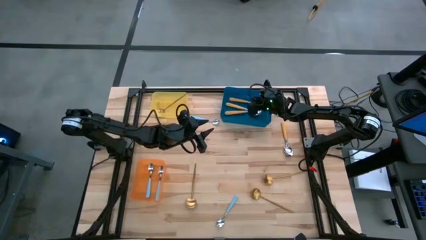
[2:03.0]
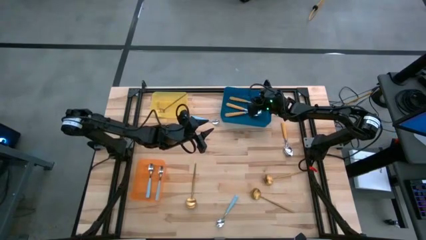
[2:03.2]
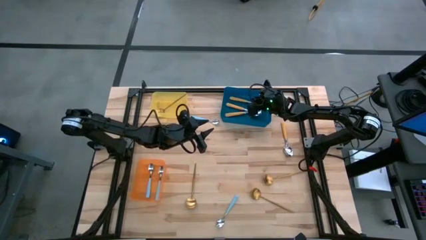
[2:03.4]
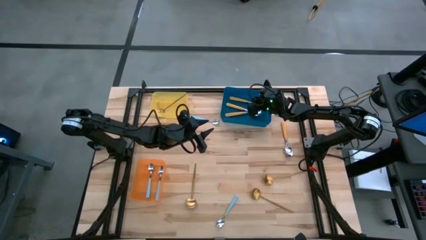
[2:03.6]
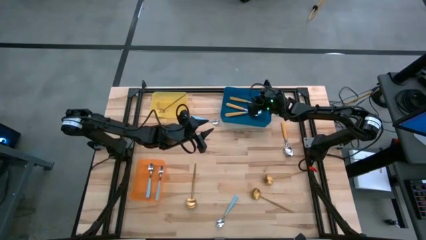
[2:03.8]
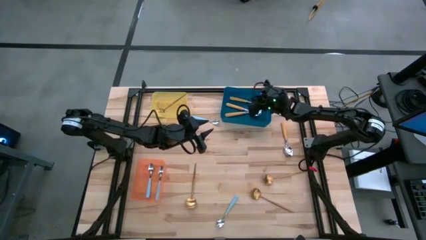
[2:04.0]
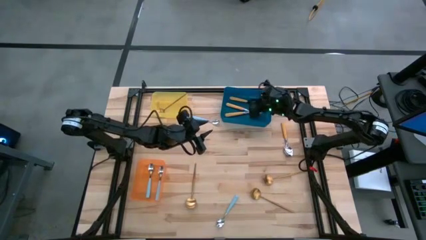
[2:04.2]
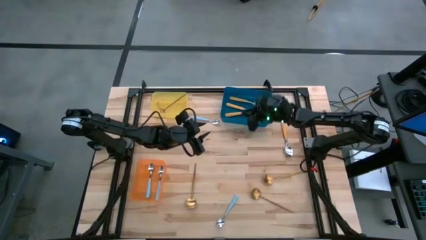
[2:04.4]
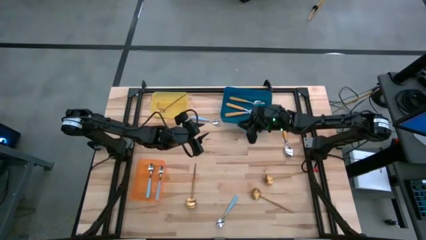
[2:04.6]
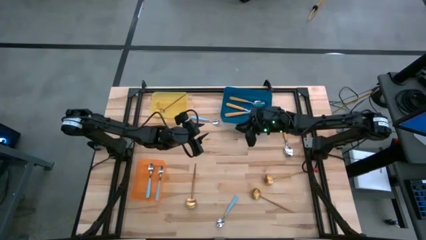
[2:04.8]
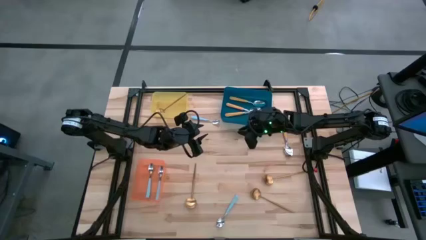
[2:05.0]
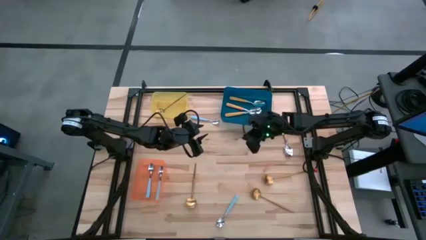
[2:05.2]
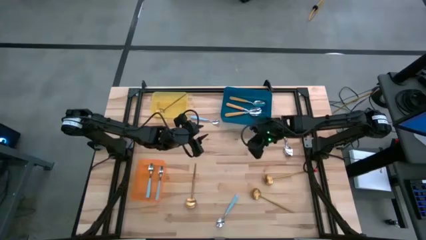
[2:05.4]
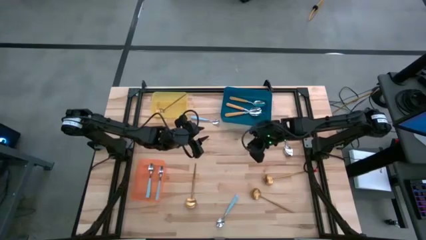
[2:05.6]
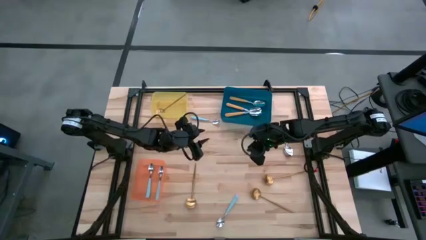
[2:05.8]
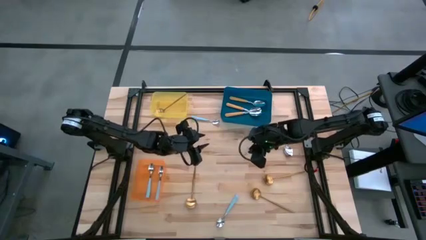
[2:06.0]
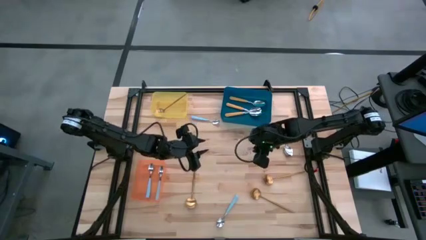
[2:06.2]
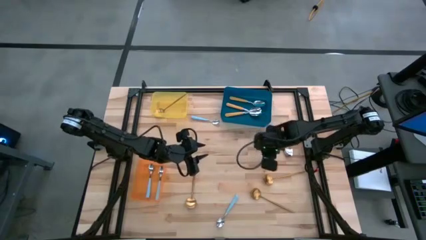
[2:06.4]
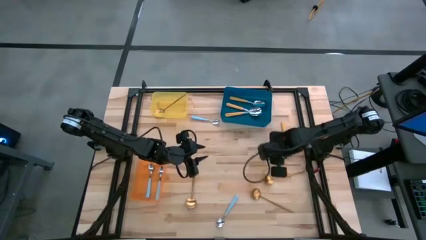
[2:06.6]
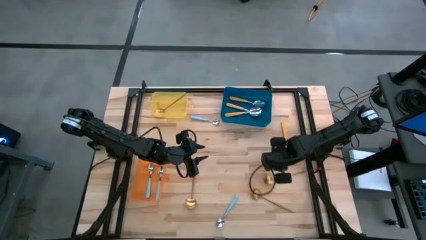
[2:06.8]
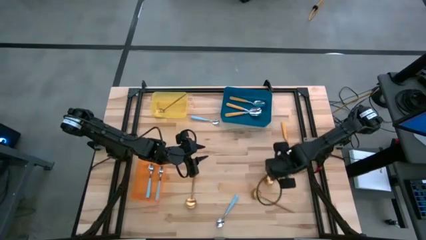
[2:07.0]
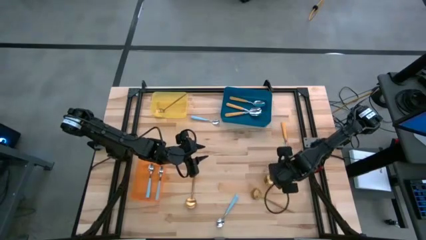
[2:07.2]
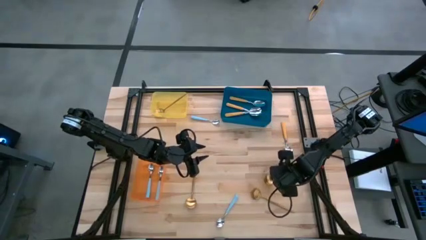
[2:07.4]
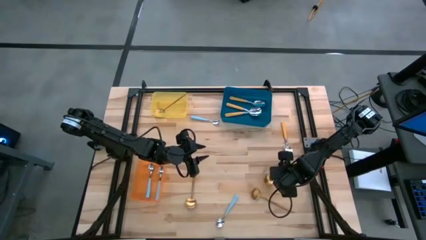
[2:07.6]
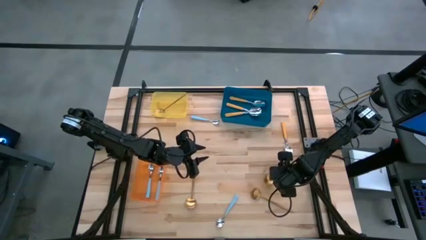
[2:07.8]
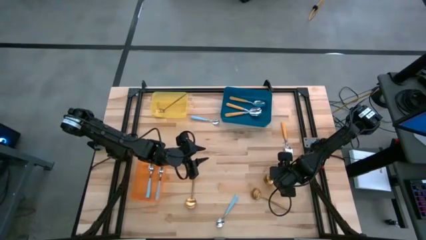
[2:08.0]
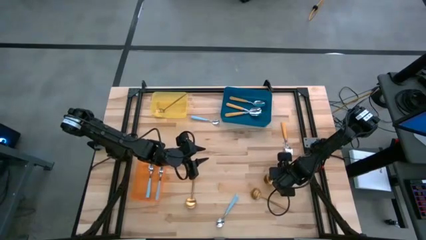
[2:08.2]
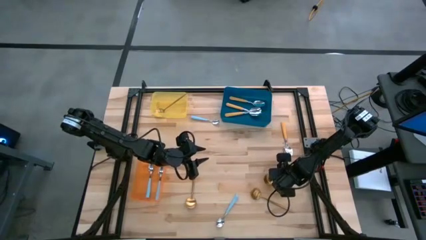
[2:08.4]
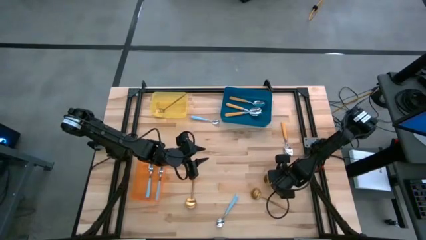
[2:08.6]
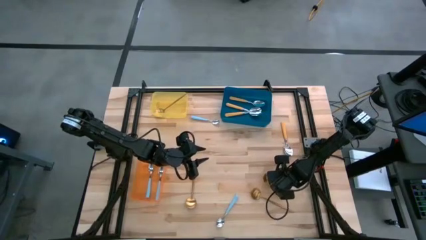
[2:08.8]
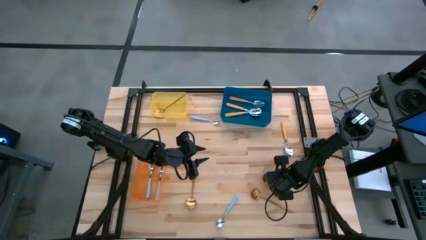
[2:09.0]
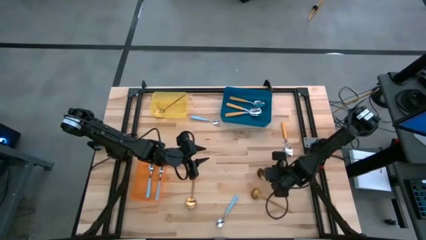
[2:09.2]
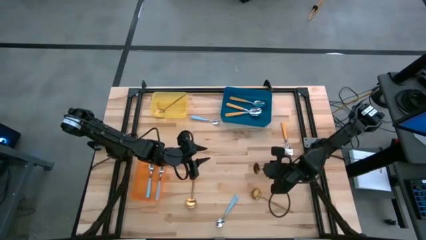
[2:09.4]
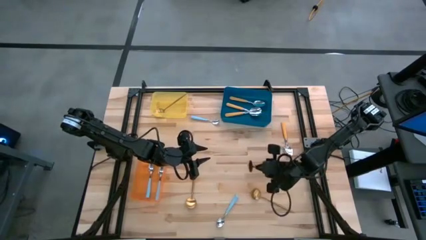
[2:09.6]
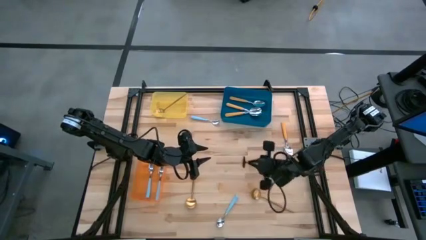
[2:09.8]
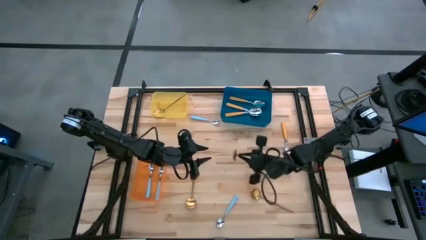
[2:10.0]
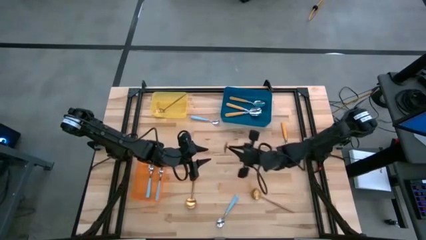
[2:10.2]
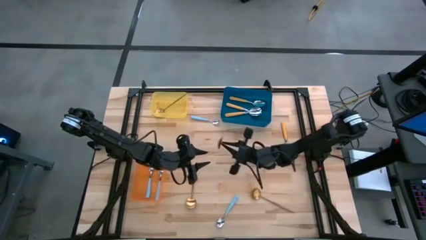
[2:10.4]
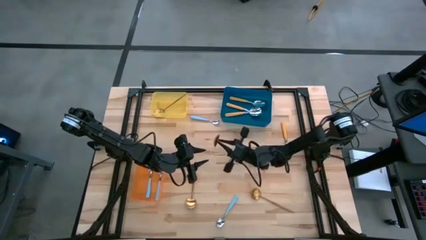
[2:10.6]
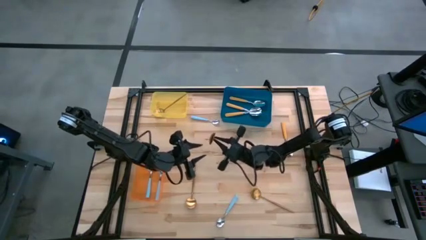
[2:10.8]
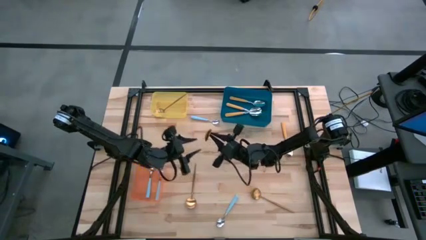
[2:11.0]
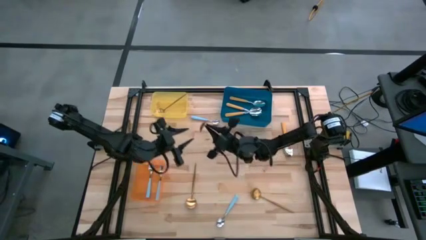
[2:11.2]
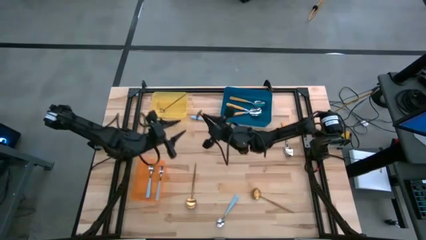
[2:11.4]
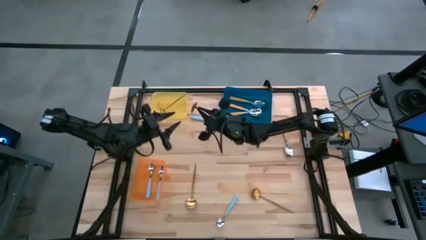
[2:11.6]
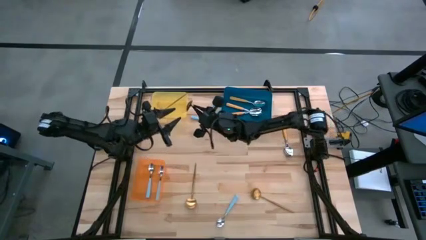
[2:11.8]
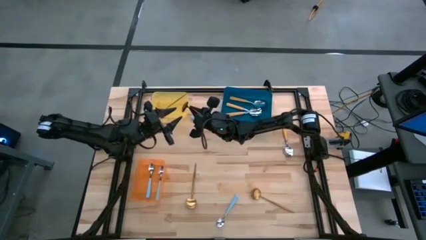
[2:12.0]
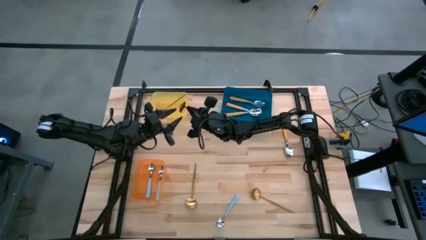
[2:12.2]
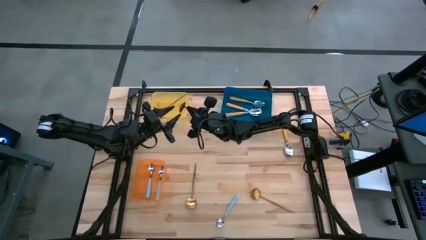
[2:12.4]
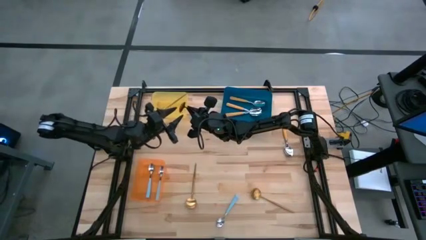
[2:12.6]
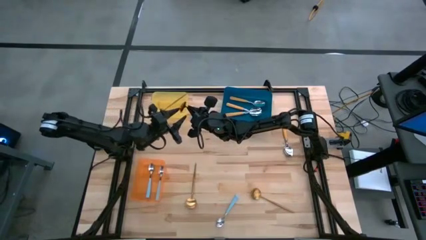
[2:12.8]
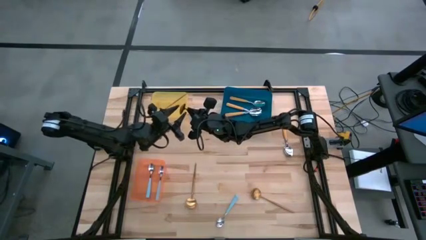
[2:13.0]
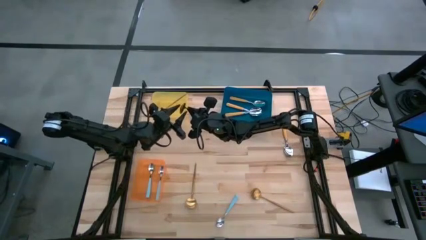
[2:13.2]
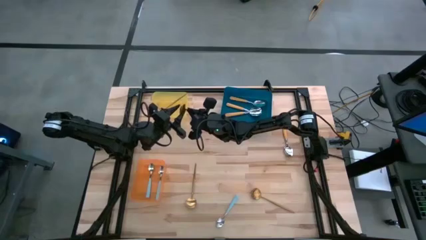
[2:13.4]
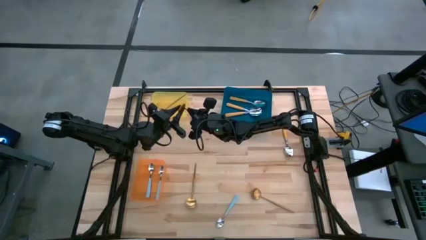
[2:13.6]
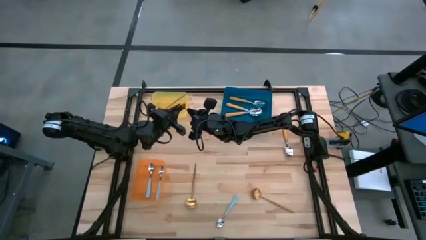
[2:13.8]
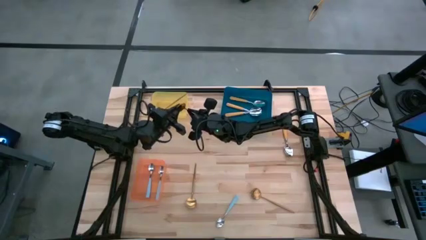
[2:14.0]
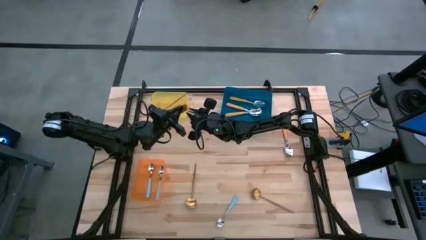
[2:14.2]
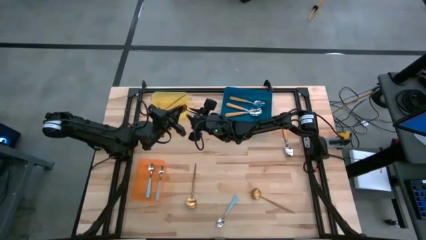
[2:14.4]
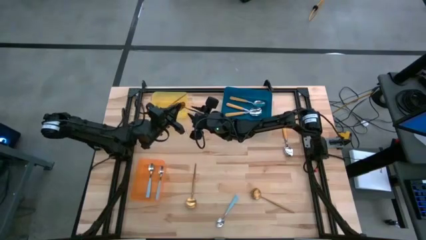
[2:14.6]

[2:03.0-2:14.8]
Task: Sort silverware by color (type)
Put the gold spoon into the yellow bin

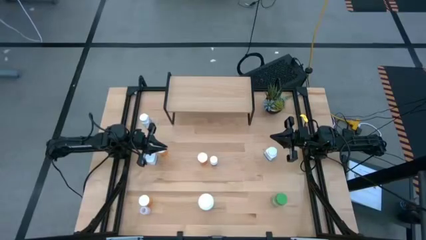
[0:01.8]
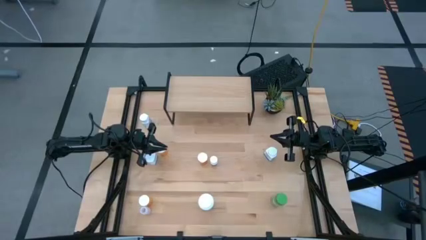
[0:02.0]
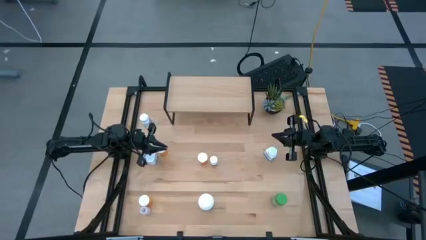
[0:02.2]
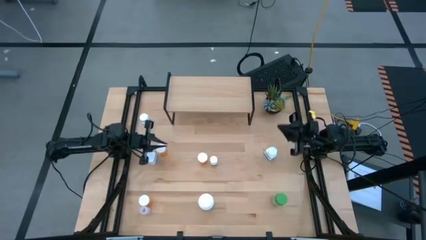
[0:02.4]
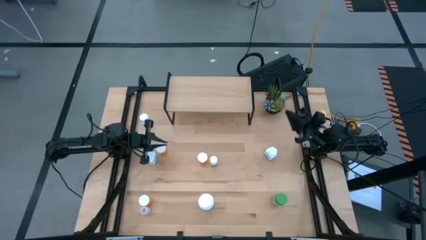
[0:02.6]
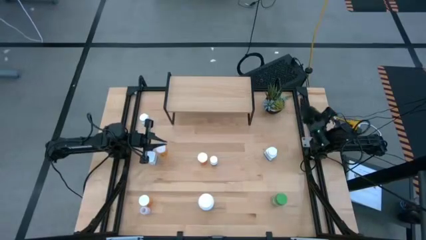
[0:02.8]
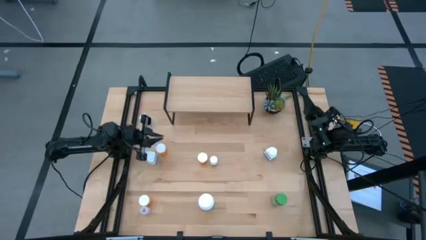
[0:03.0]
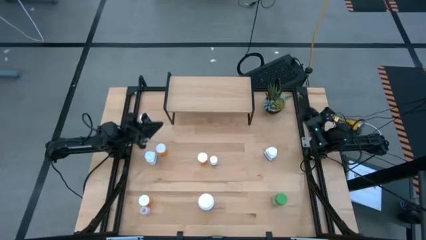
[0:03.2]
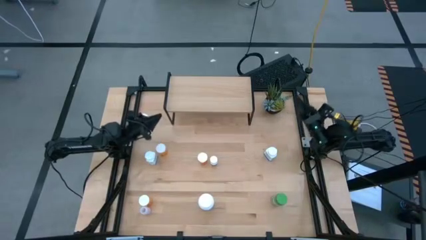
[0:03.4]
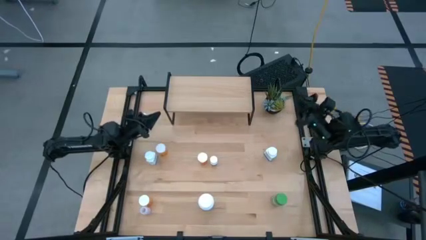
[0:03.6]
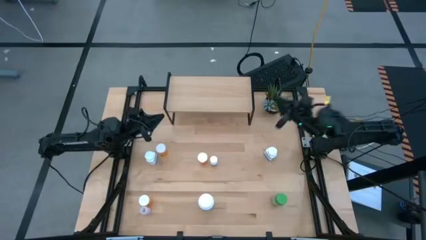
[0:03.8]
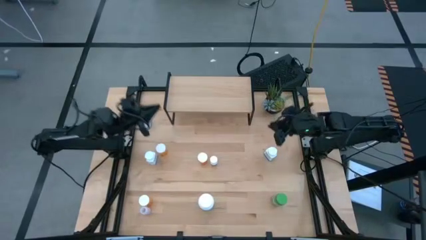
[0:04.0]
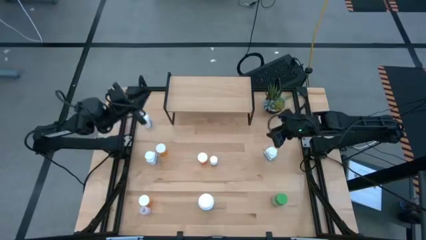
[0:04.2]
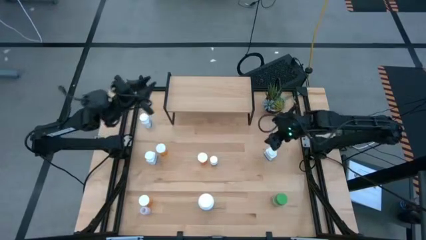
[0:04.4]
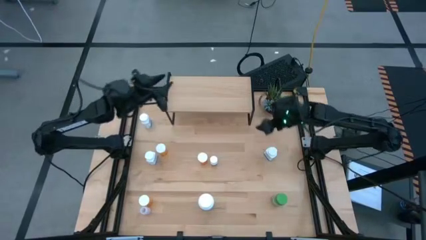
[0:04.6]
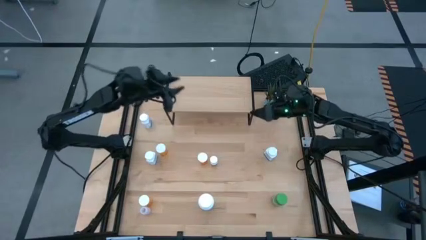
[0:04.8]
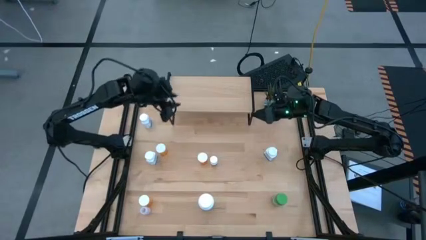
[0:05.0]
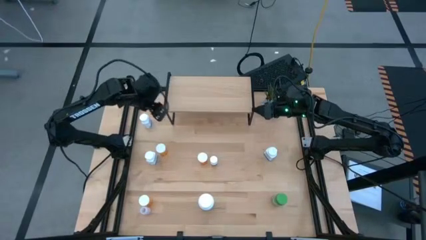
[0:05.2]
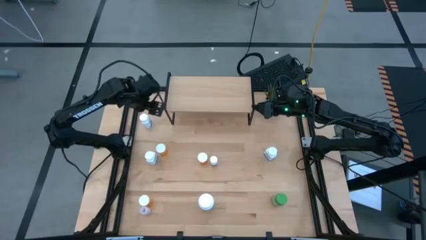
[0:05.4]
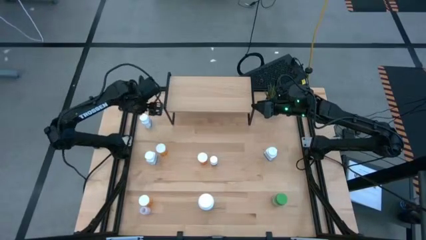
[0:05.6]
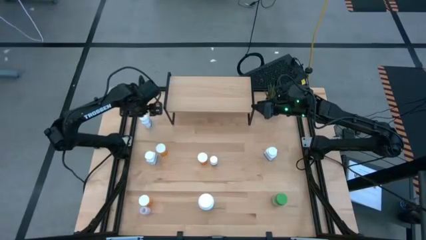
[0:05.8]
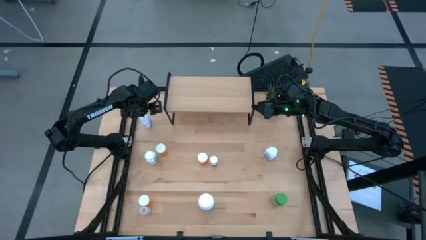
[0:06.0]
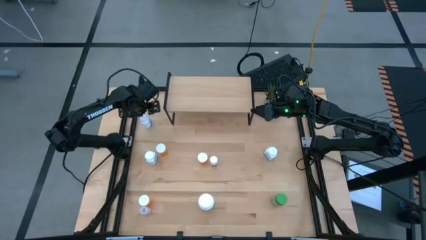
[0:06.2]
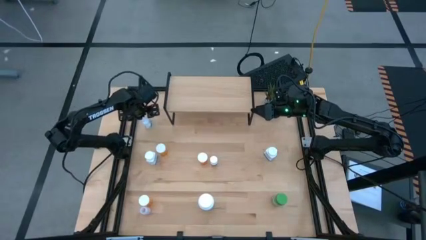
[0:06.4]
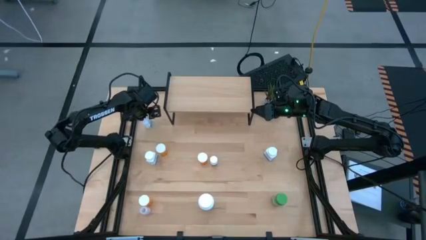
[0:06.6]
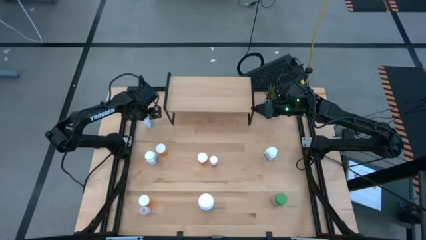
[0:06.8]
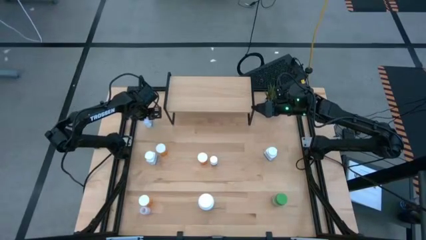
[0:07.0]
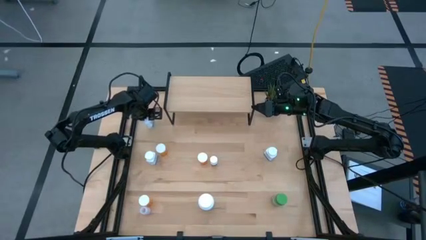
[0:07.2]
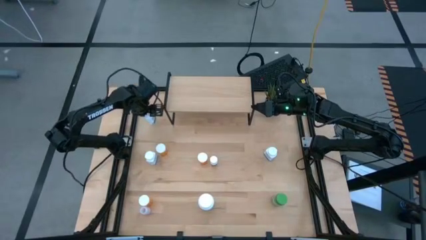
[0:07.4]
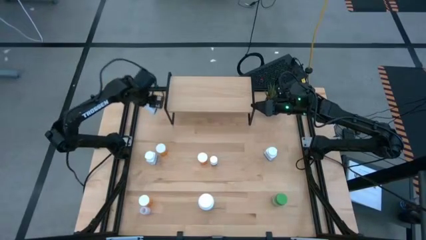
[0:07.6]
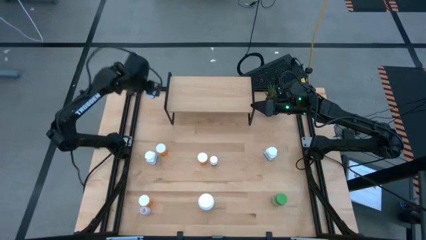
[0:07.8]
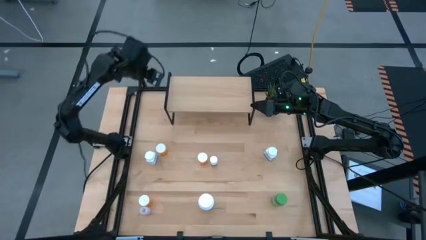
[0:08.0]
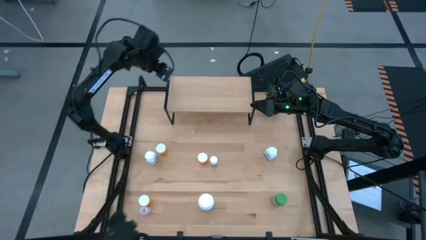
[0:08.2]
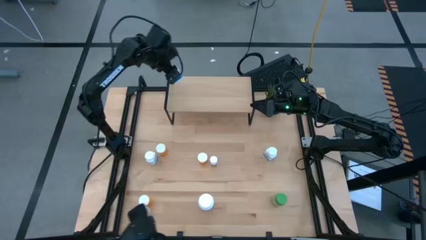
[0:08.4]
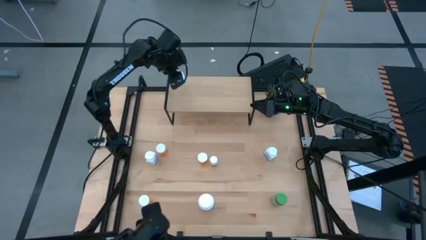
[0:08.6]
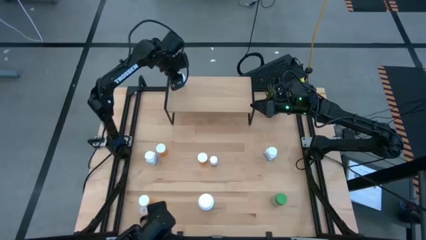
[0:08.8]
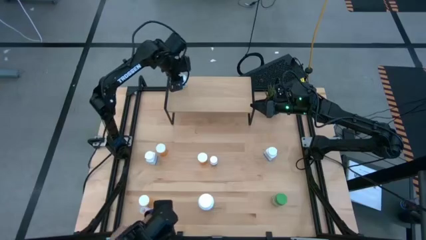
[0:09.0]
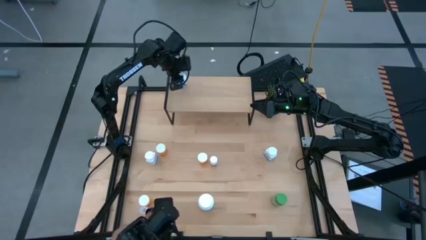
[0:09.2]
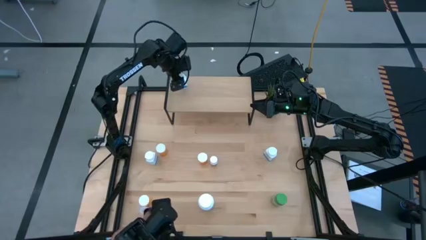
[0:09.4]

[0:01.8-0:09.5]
Task: Pick and place medicine bottles onto shelf by color
Put the top left white and blue pill bottle on the shelf
